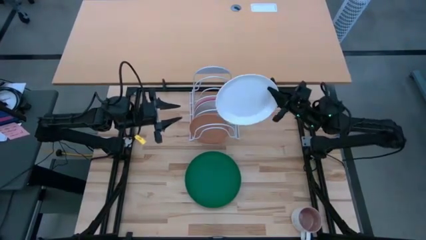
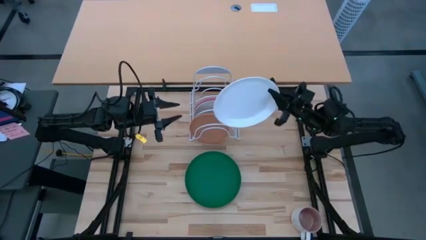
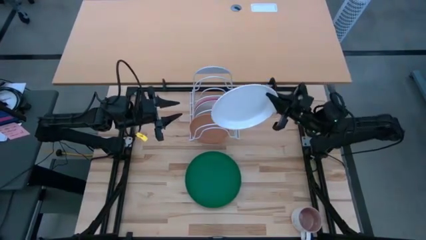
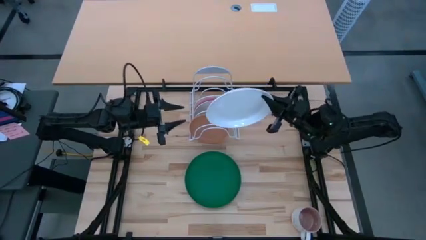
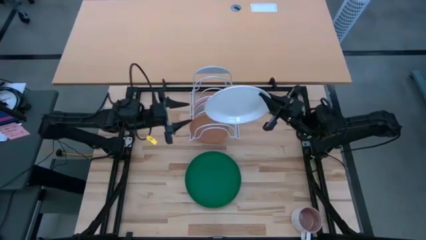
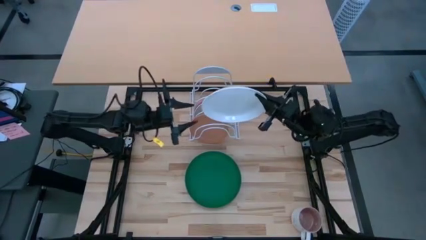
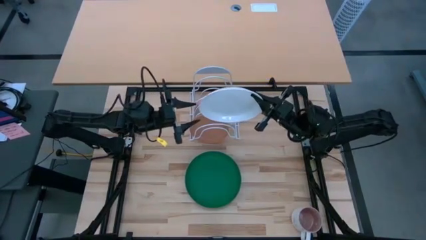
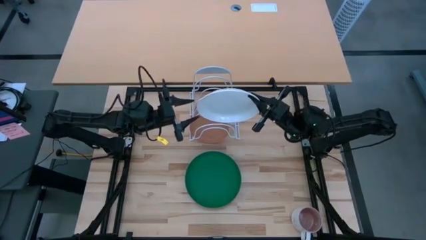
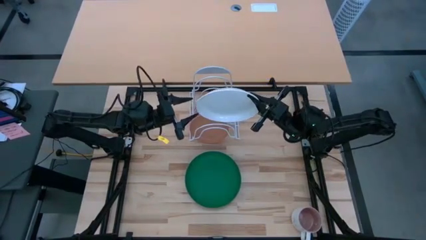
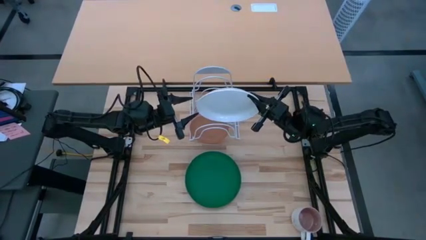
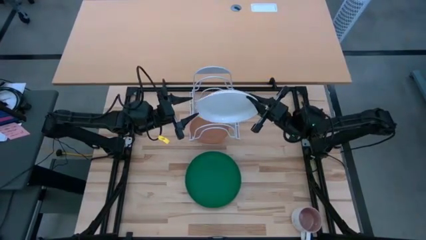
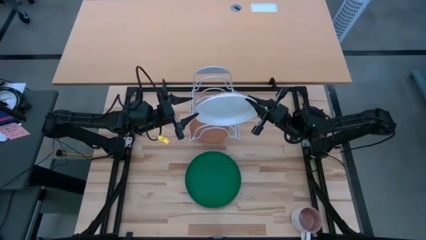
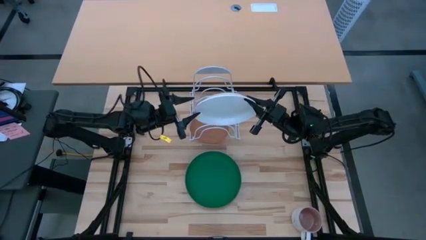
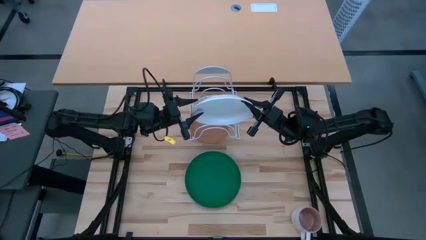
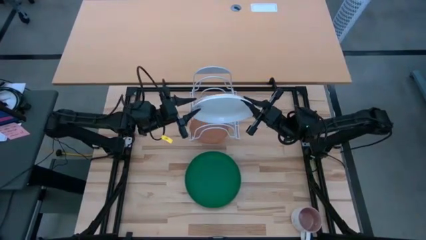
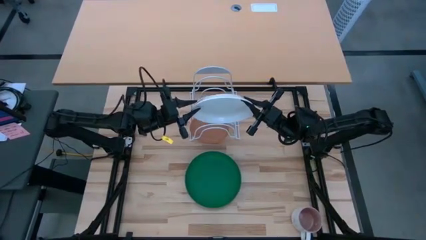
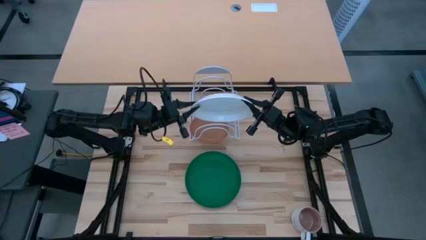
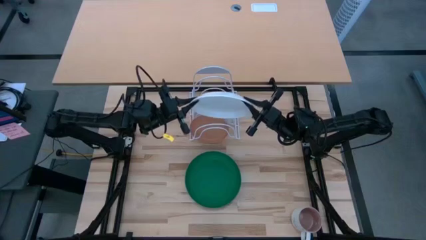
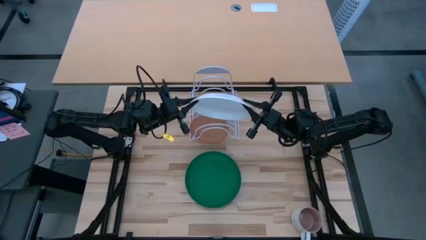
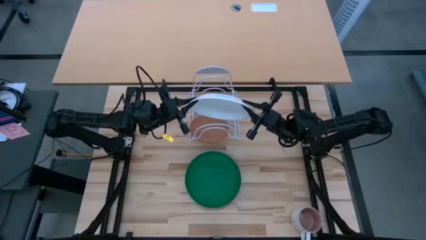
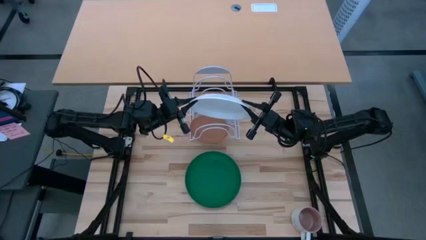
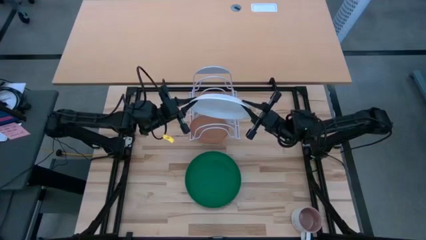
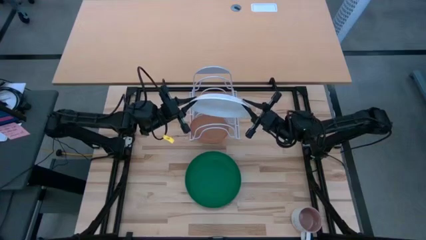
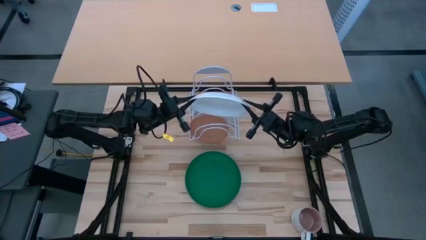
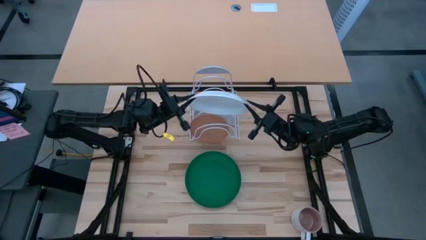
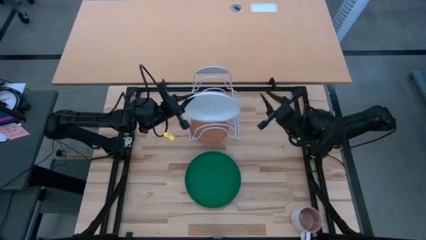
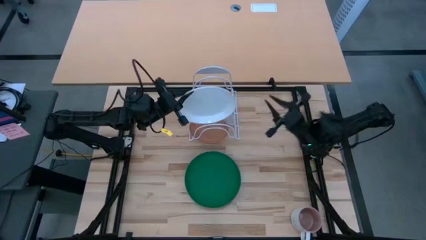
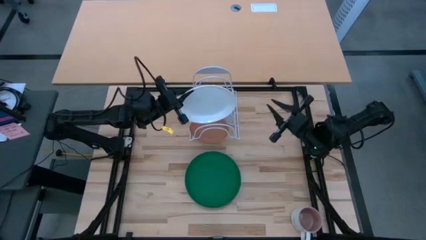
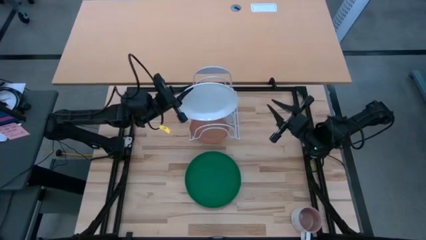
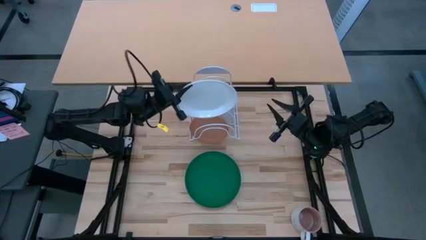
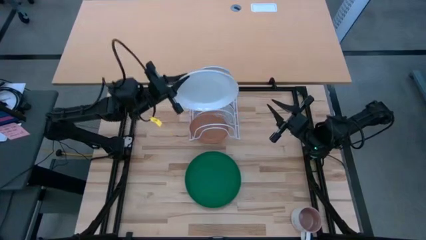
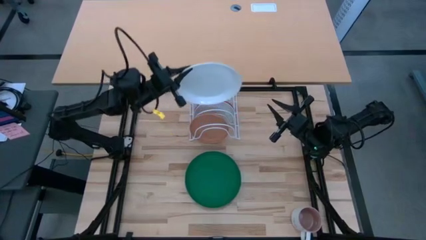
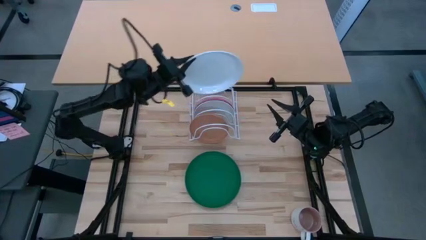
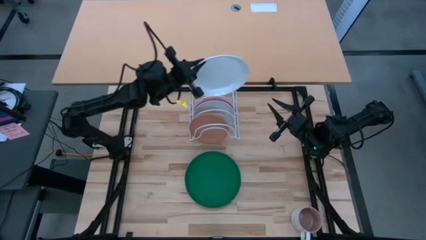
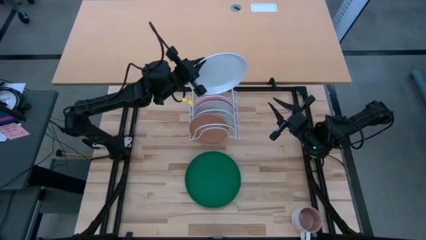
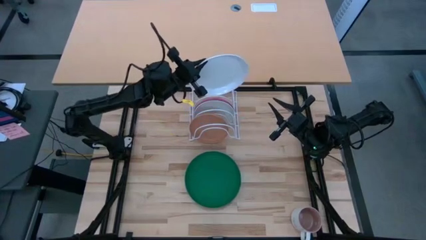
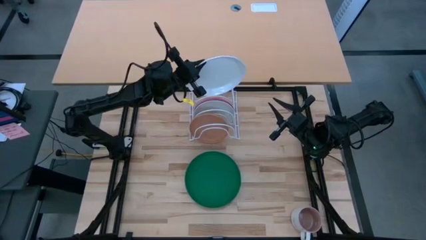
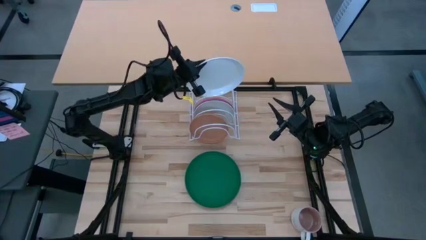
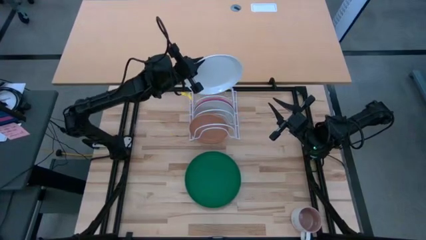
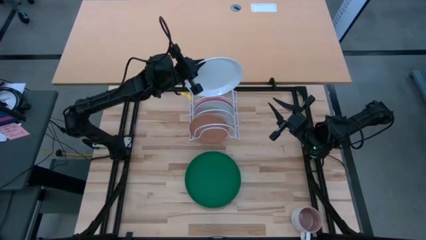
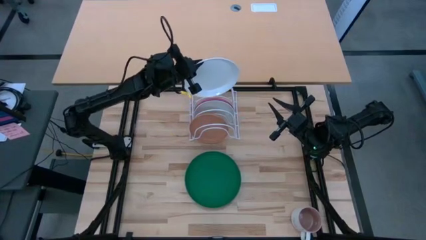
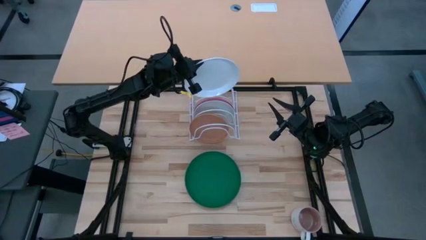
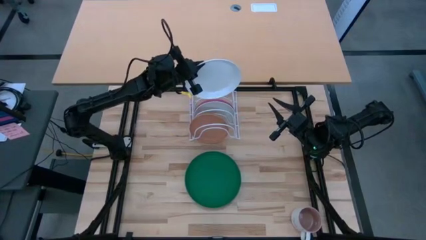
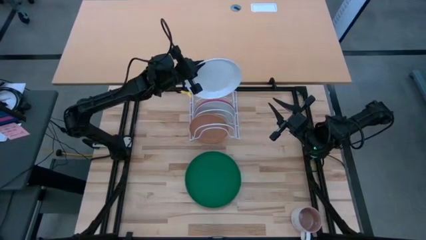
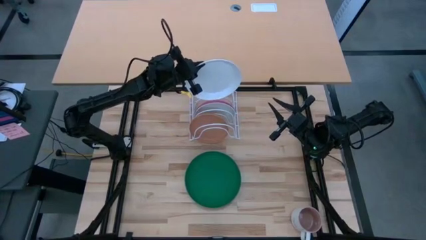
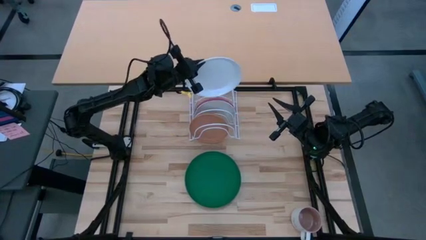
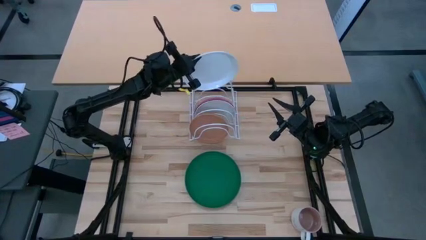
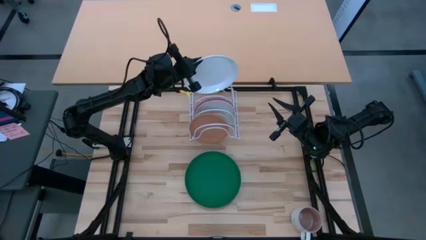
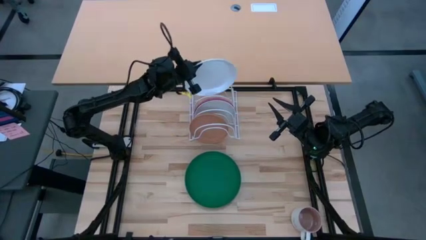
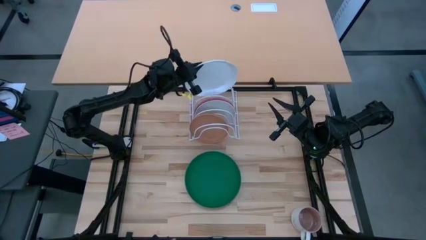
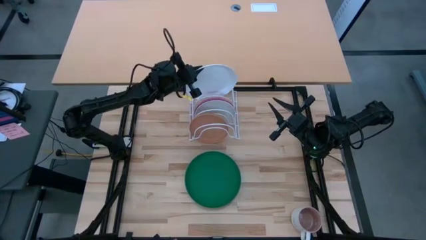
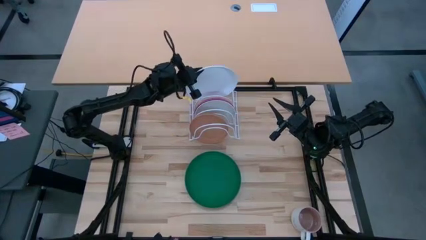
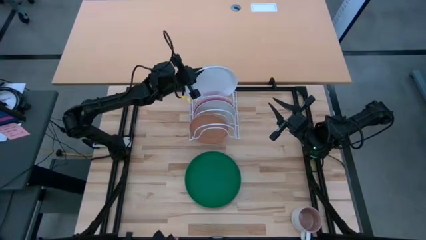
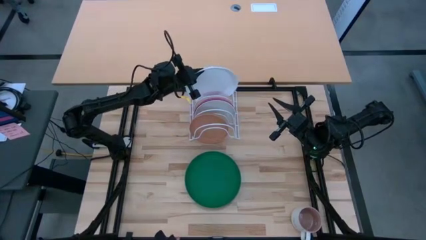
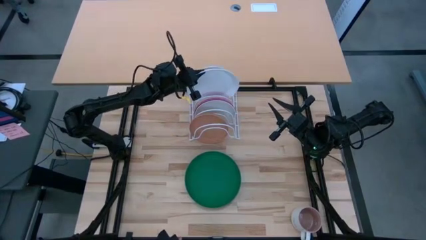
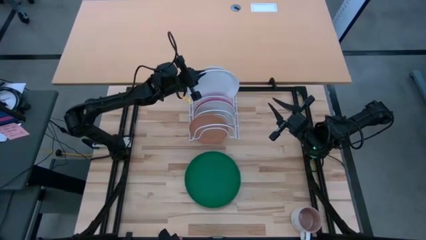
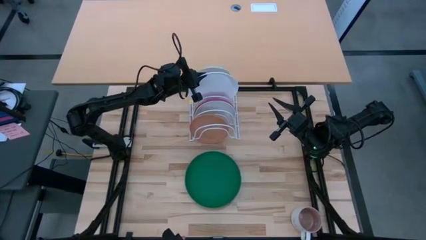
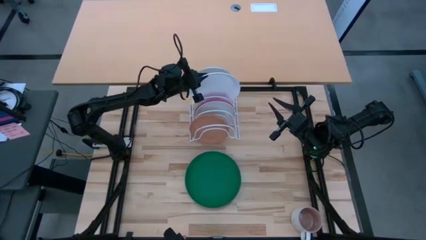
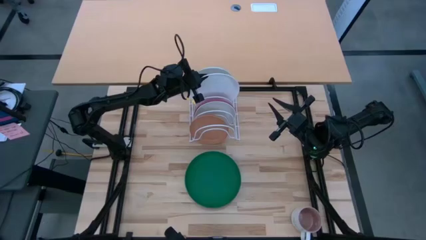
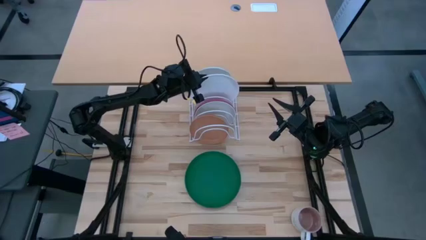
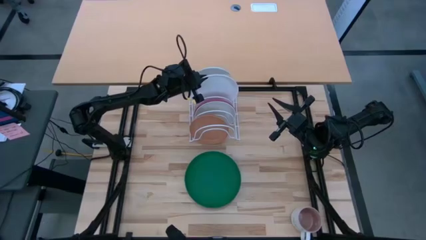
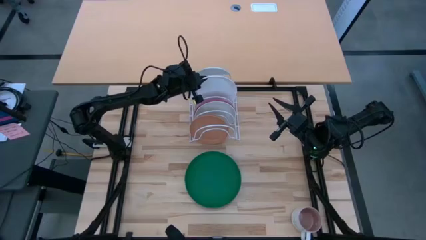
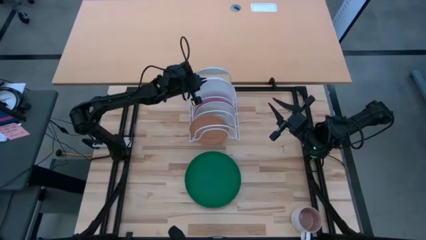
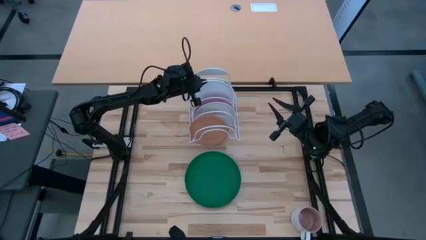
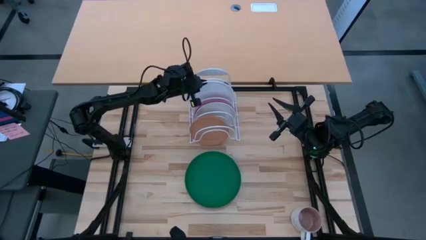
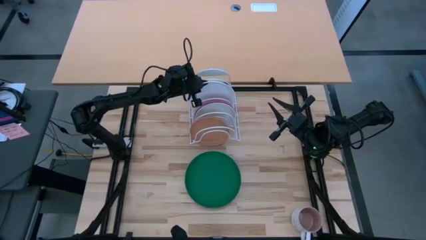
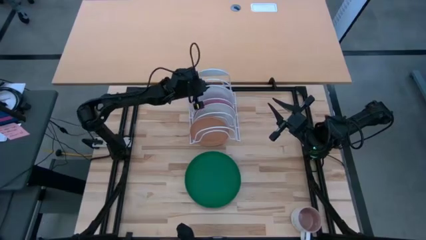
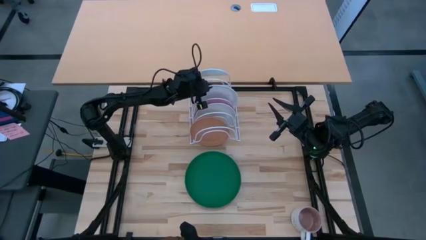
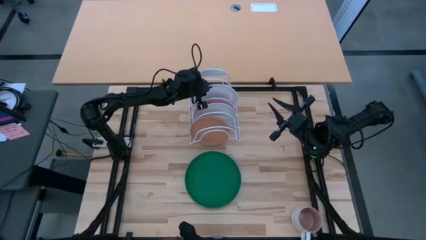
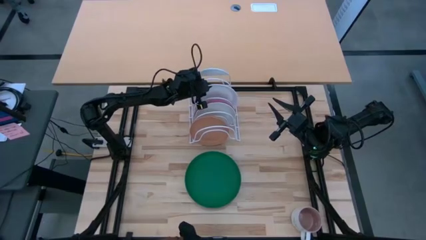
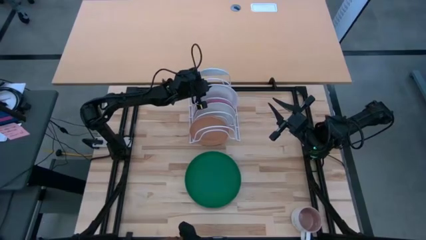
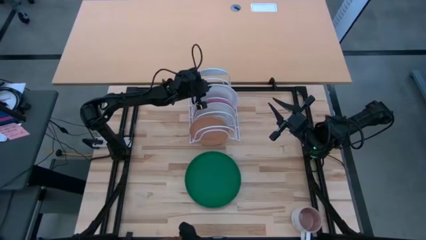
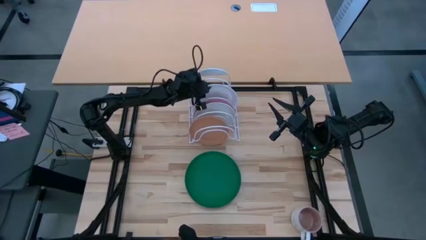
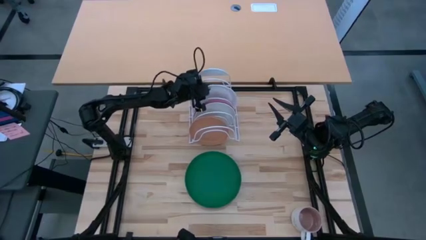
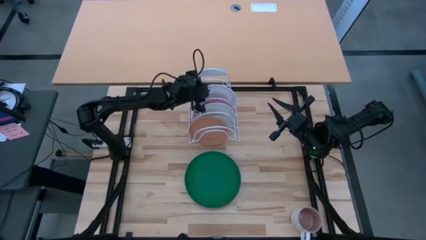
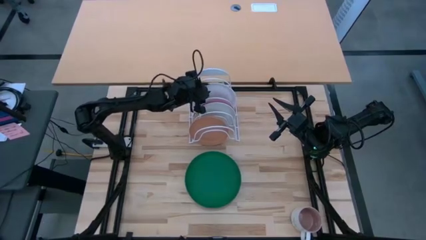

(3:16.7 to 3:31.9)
Task: Sort dishes
Put the white plate on the dish rack
